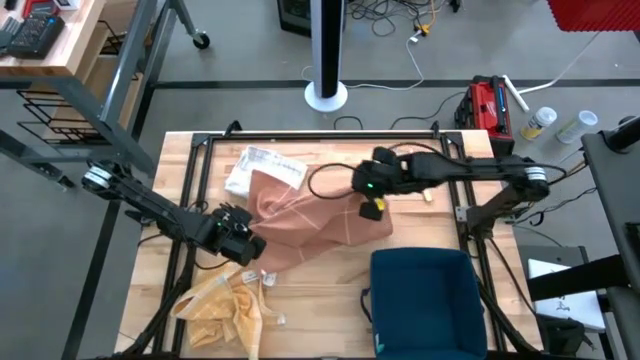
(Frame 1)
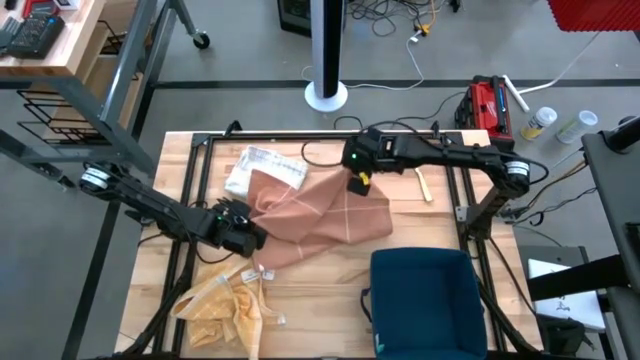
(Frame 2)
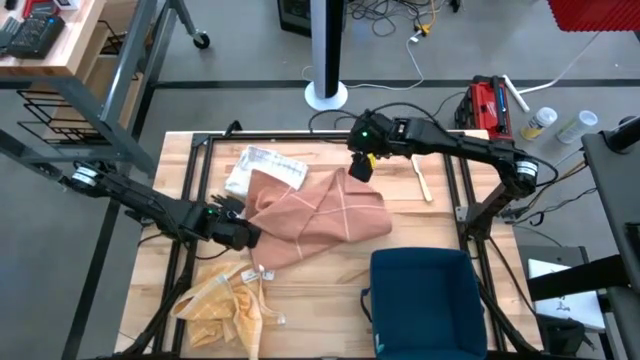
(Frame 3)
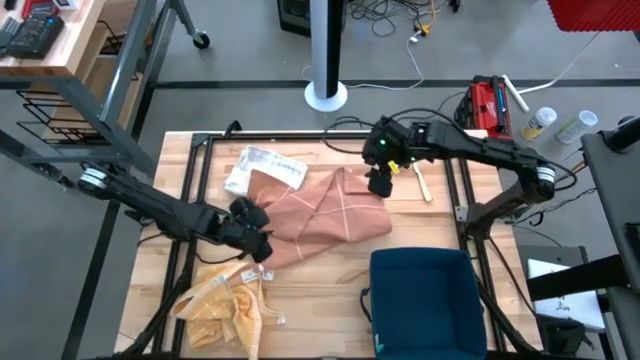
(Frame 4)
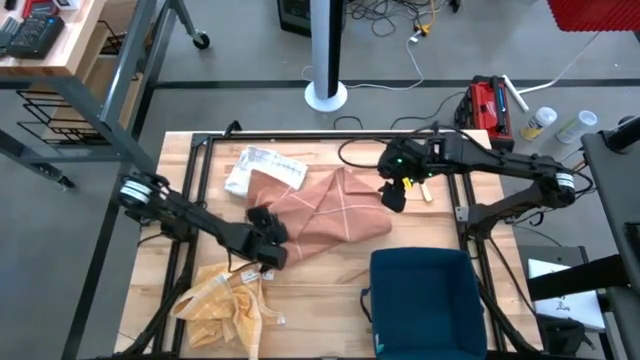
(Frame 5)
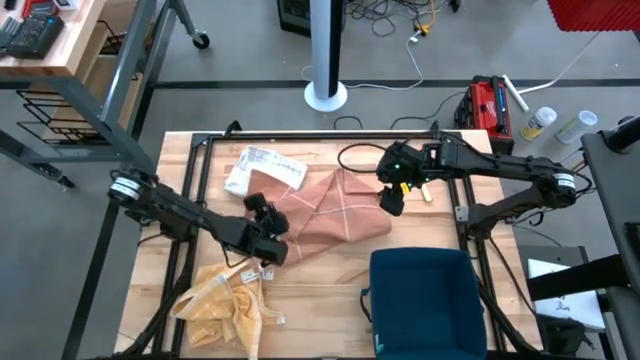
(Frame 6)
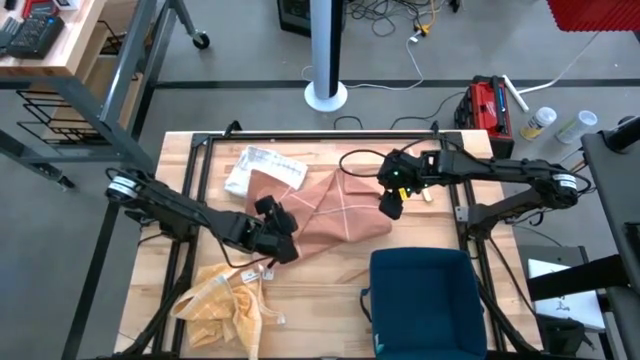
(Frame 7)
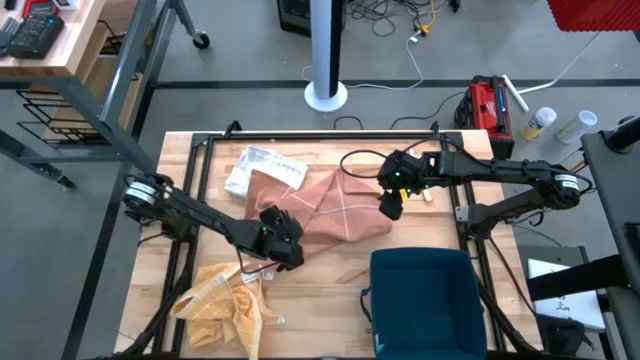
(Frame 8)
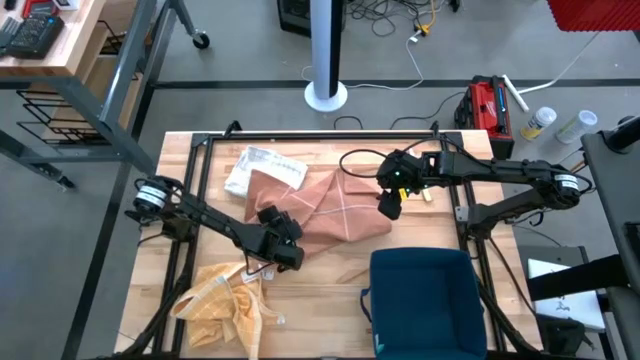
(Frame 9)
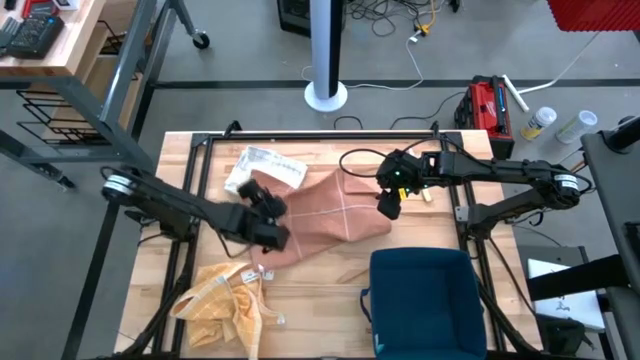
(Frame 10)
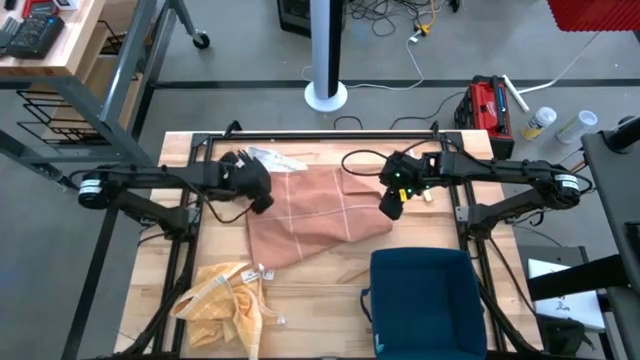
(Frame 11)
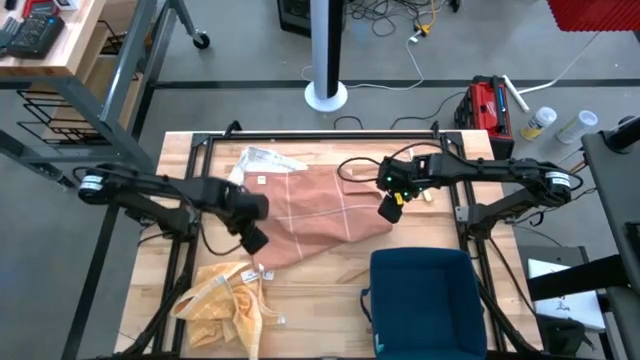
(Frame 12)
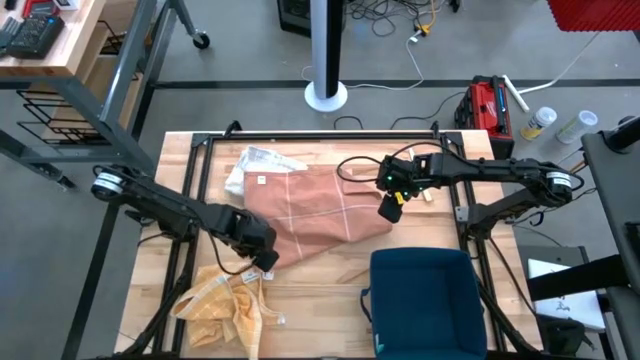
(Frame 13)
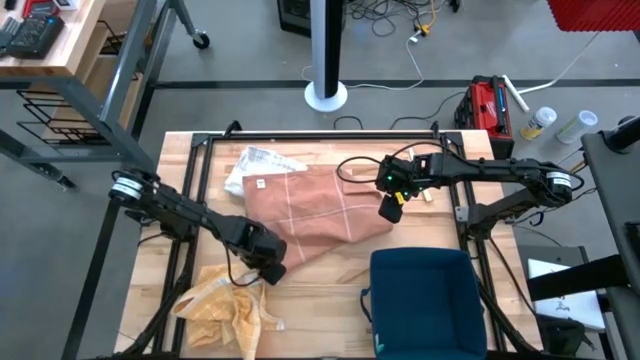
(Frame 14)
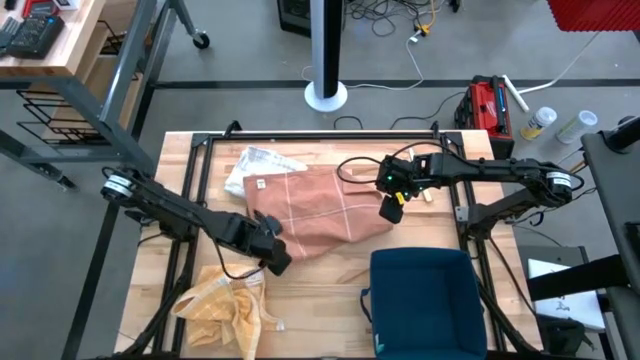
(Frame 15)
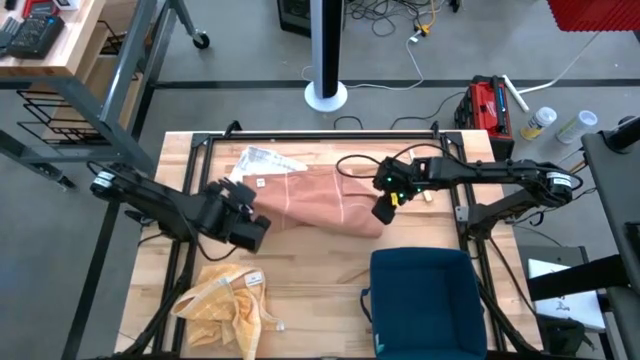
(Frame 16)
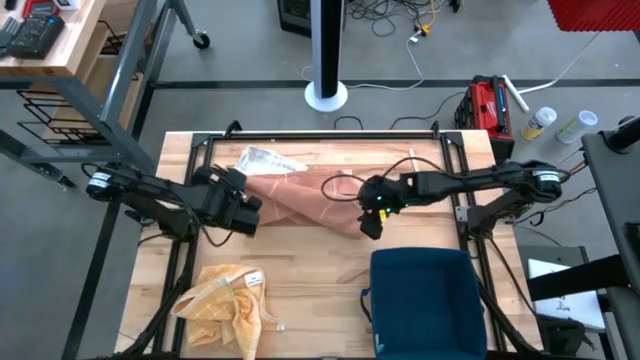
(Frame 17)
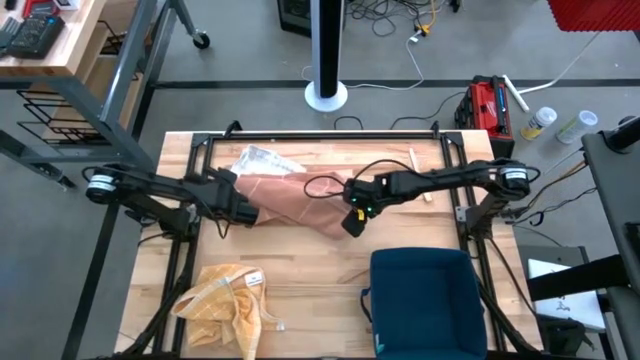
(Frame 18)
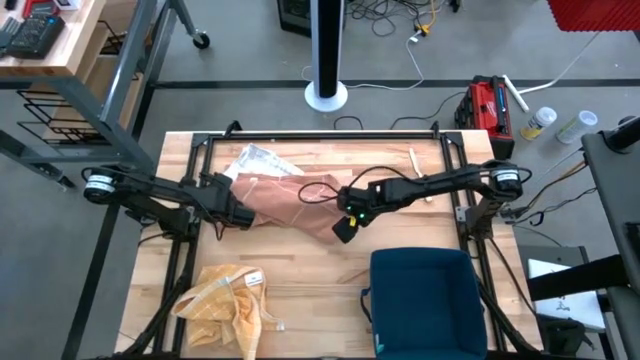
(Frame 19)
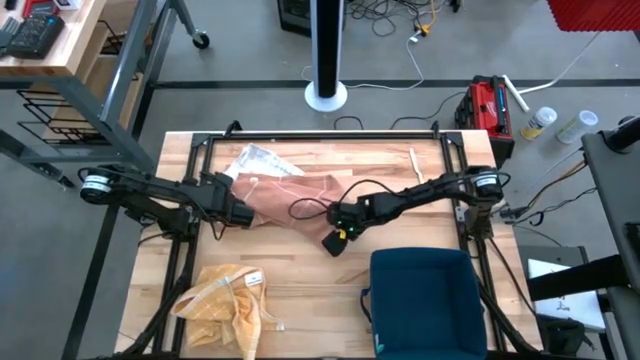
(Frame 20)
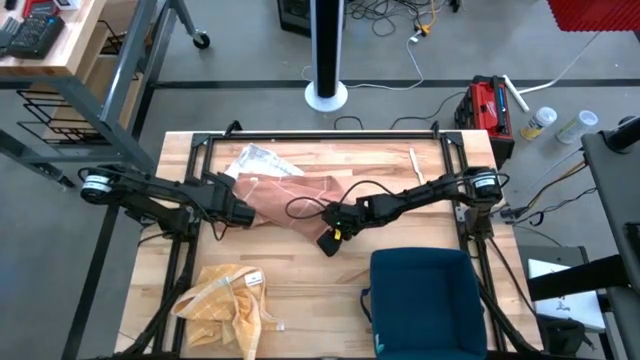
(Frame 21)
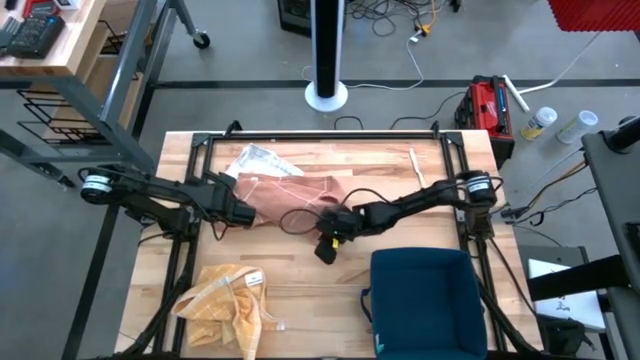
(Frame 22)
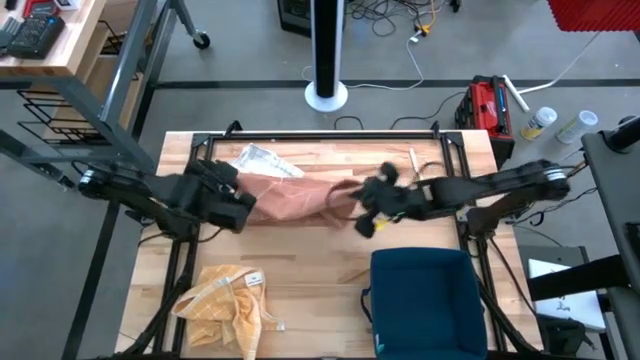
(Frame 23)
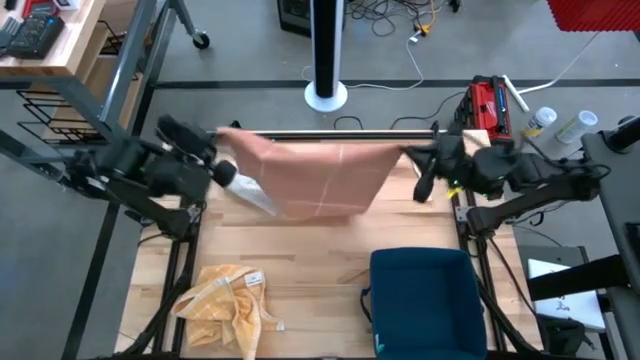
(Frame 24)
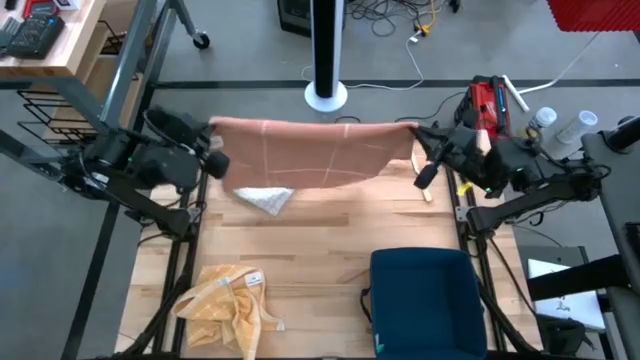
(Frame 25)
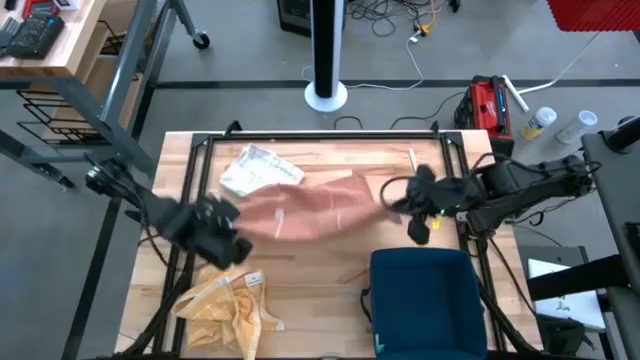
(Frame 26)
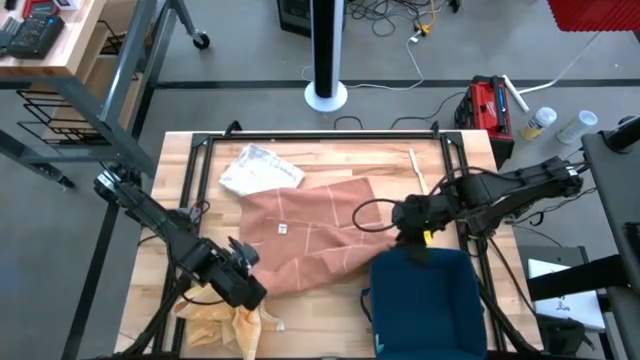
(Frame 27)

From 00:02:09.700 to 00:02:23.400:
Task: Fold towel
Fold the brown towel

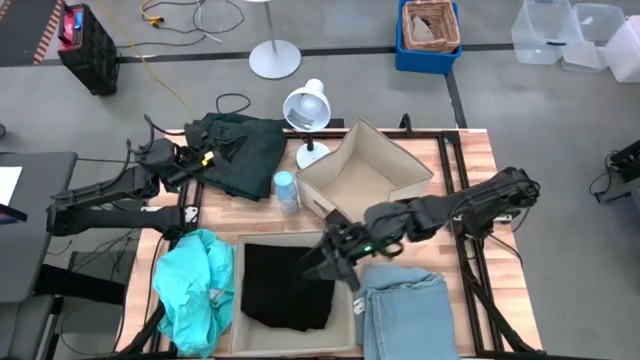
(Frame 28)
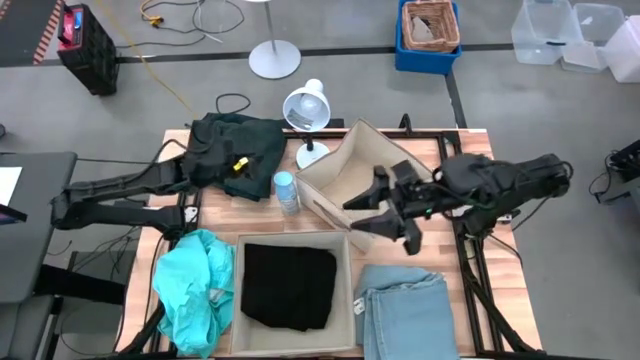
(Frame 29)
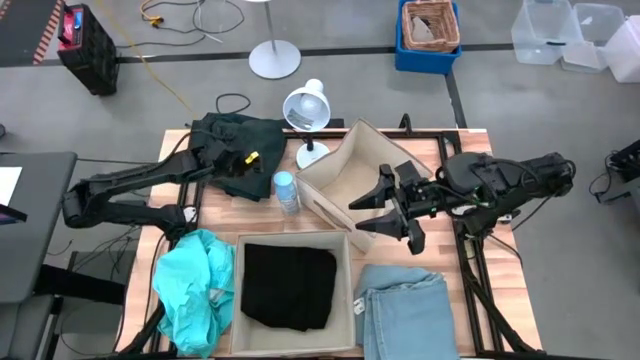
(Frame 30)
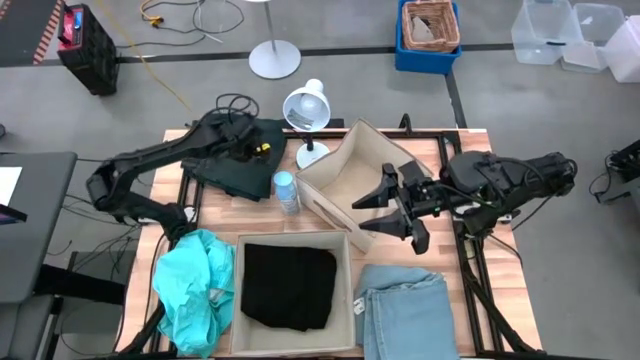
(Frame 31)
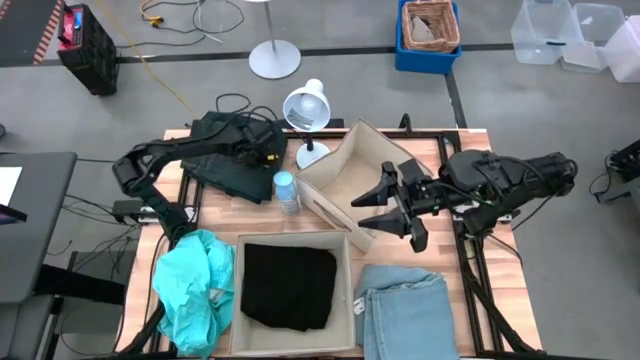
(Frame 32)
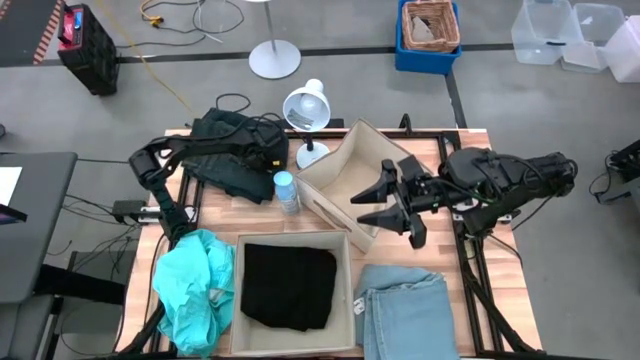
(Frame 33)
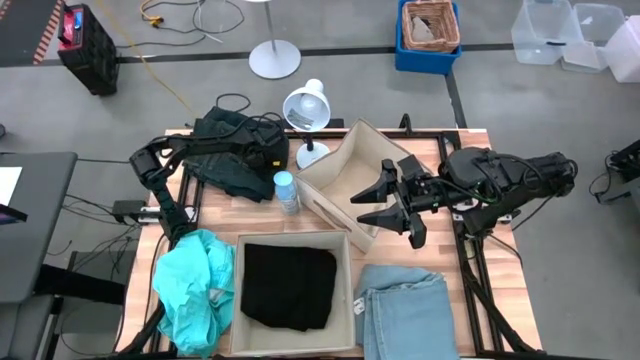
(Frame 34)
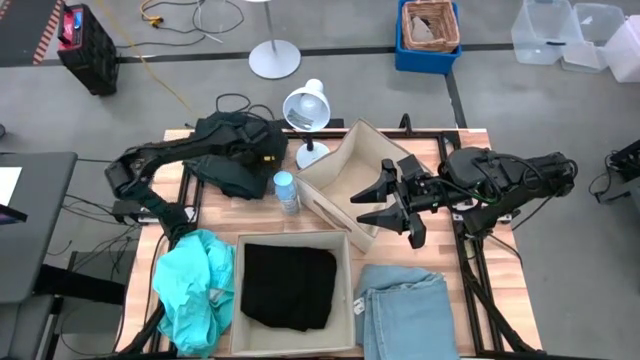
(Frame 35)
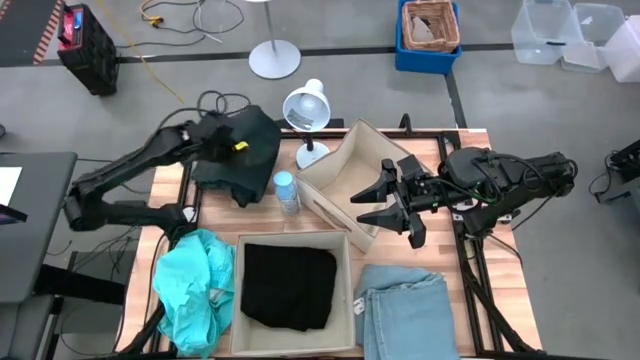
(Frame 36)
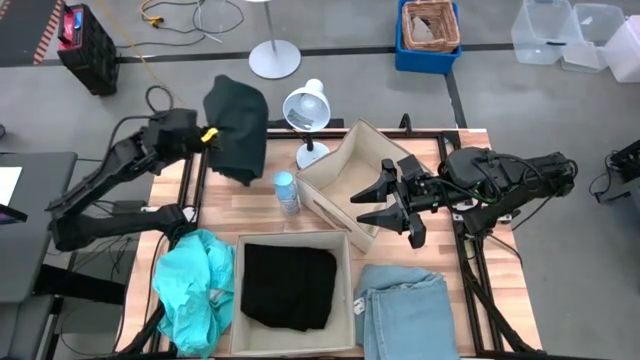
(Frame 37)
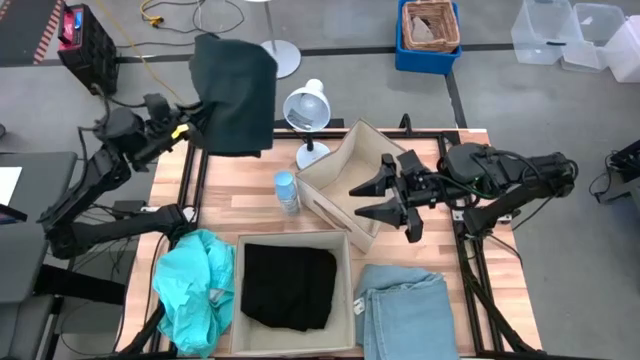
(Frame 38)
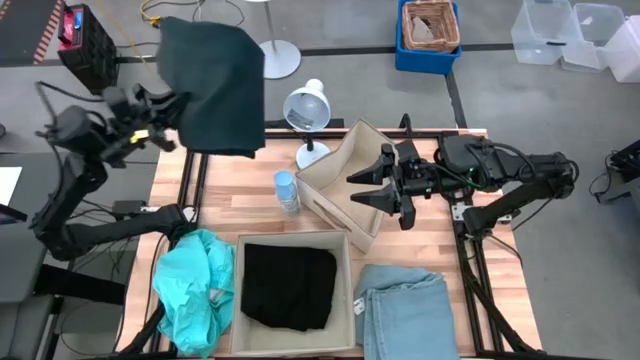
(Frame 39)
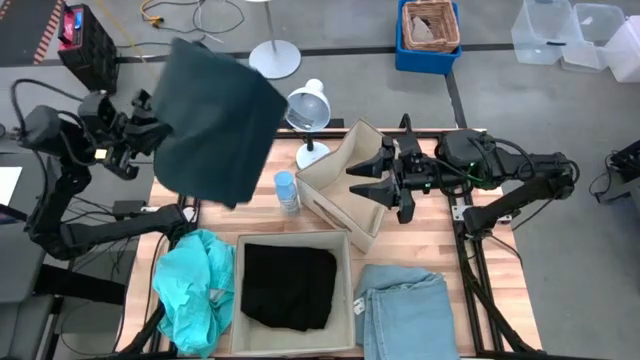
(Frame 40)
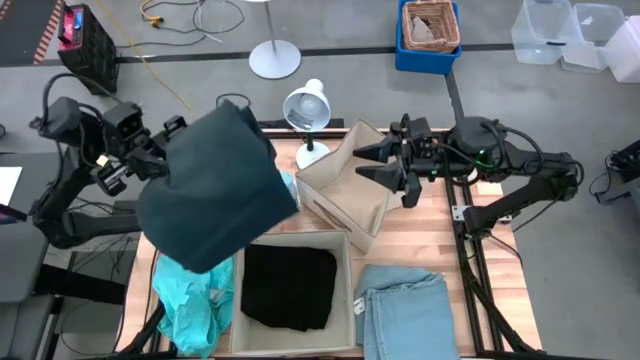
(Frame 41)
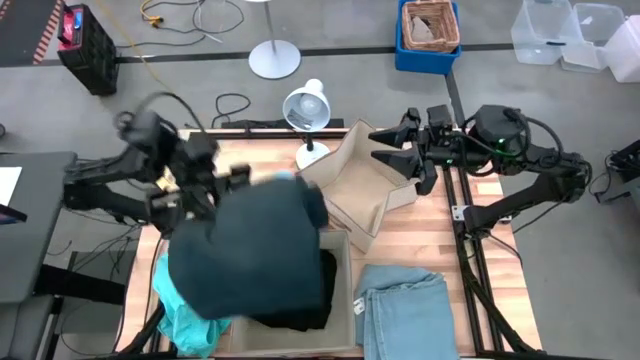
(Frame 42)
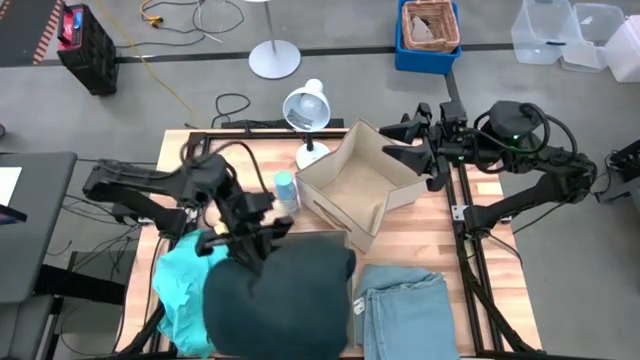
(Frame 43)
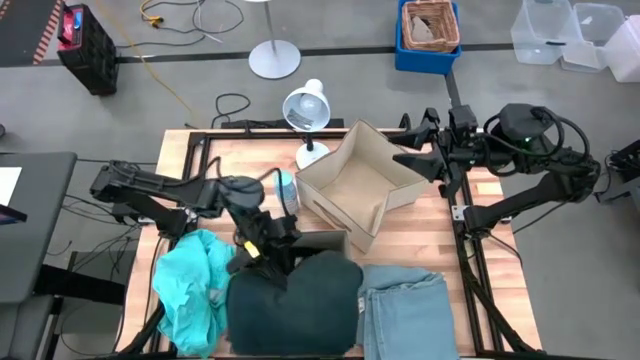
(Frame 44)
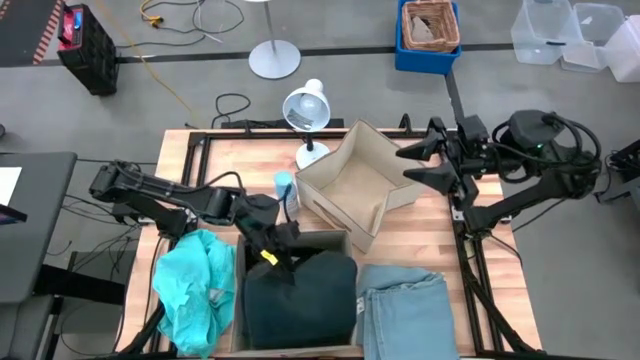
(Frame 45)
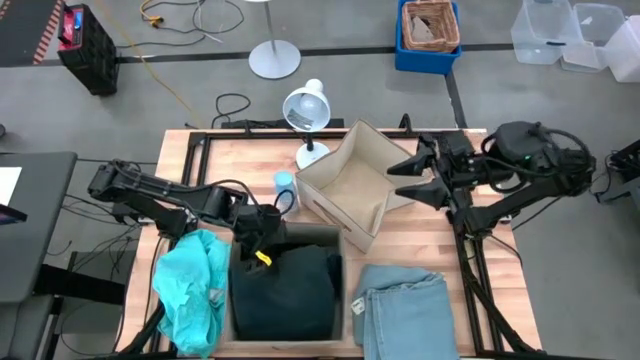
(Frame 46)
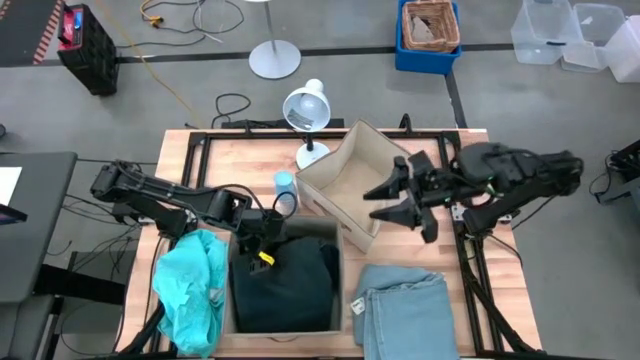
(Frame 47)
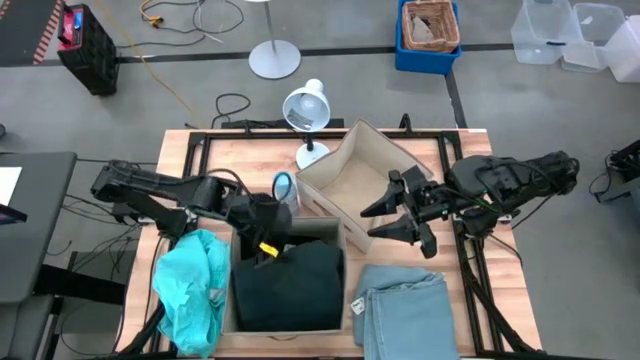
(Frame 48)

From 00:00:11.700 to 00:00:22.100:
Task: Sort clothes
Put the dark blue pants into the bottom laundry bin
